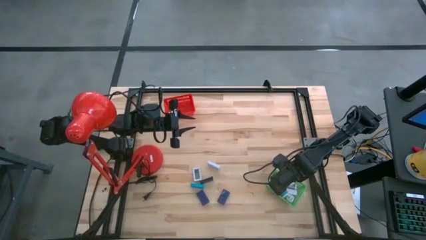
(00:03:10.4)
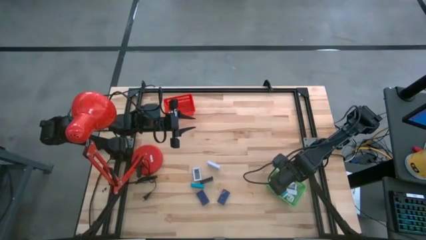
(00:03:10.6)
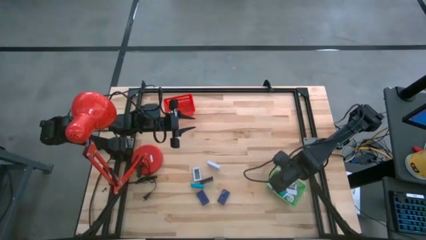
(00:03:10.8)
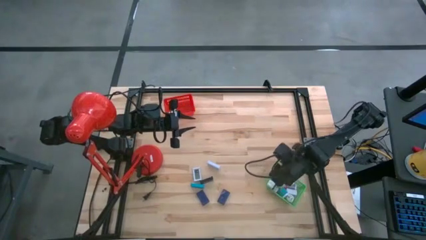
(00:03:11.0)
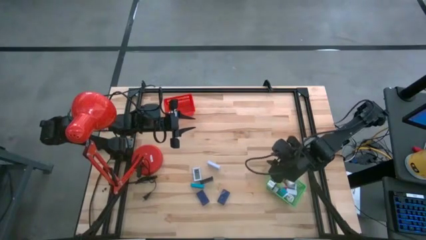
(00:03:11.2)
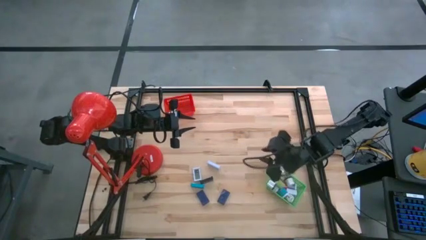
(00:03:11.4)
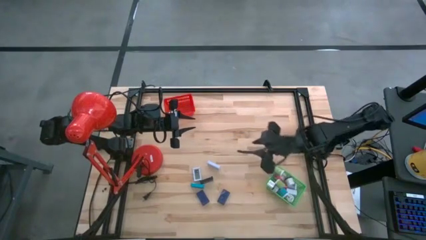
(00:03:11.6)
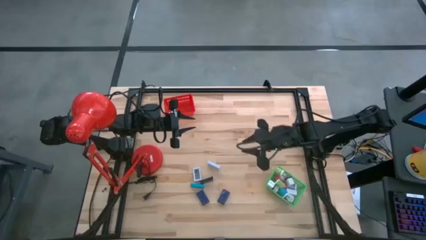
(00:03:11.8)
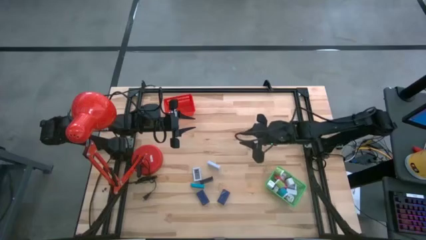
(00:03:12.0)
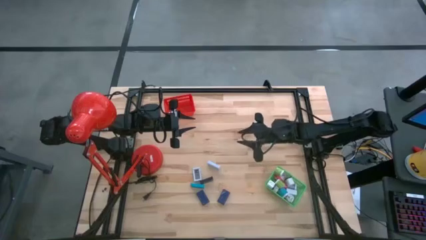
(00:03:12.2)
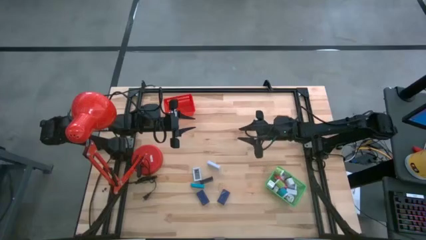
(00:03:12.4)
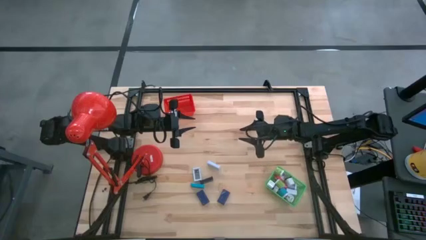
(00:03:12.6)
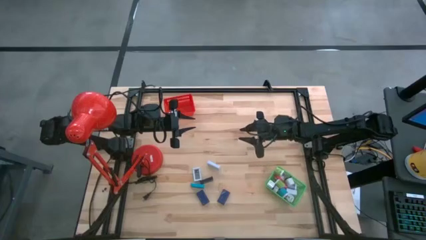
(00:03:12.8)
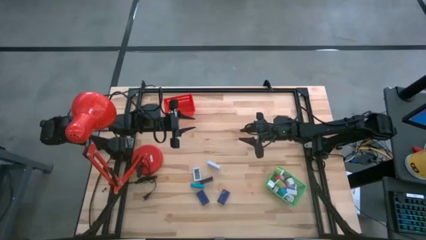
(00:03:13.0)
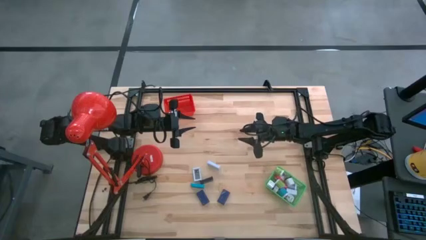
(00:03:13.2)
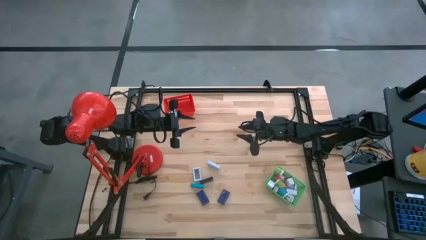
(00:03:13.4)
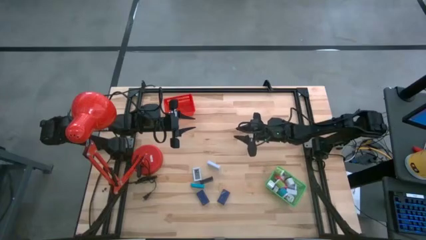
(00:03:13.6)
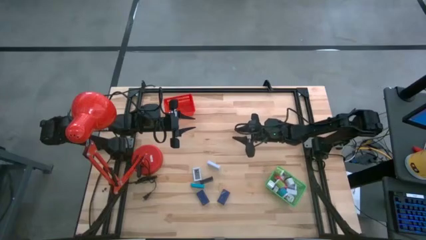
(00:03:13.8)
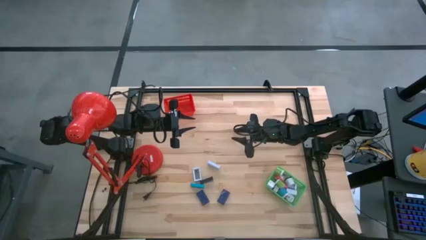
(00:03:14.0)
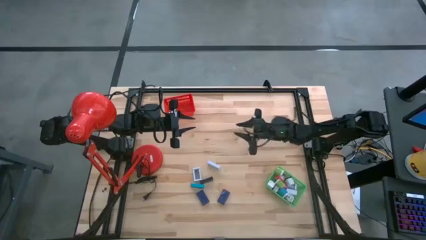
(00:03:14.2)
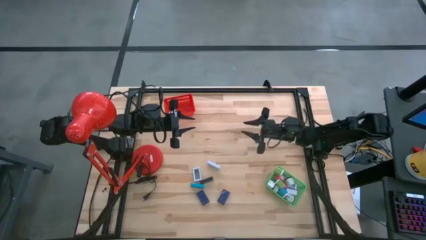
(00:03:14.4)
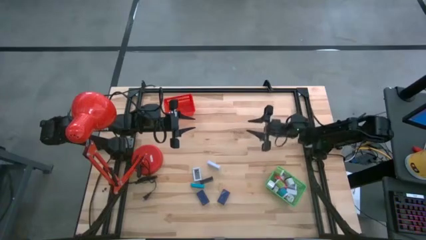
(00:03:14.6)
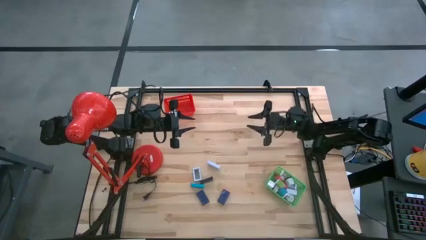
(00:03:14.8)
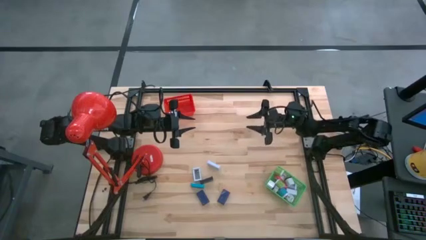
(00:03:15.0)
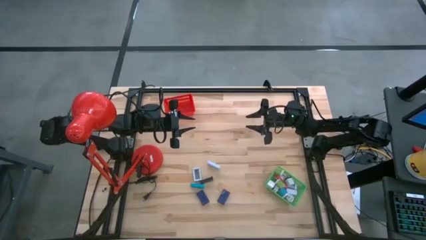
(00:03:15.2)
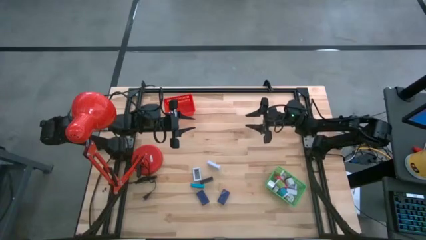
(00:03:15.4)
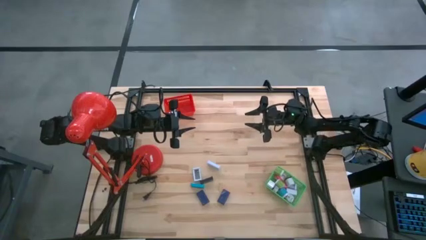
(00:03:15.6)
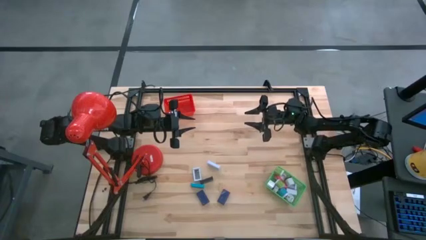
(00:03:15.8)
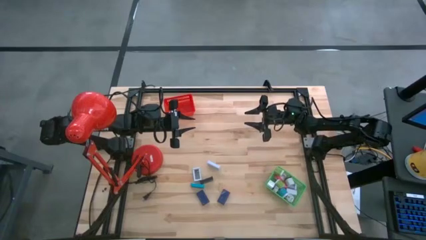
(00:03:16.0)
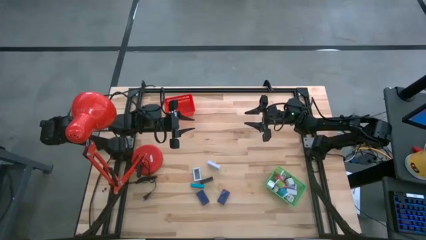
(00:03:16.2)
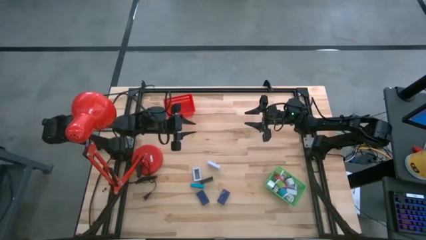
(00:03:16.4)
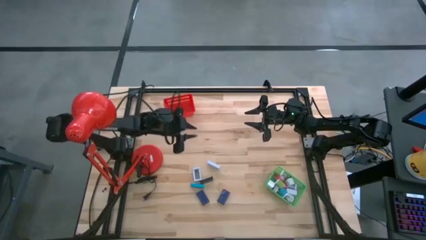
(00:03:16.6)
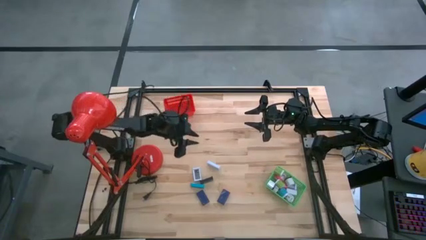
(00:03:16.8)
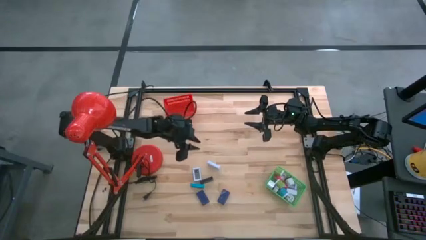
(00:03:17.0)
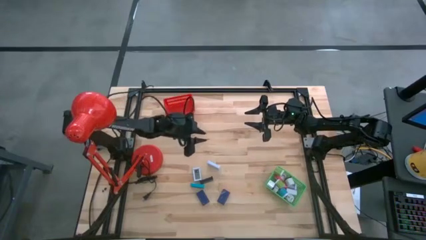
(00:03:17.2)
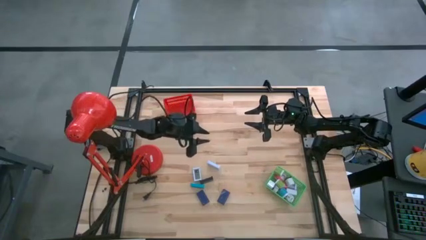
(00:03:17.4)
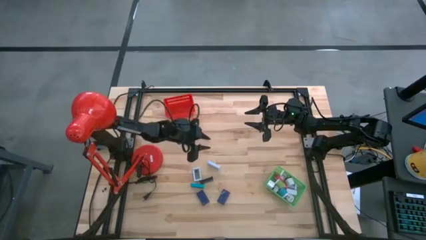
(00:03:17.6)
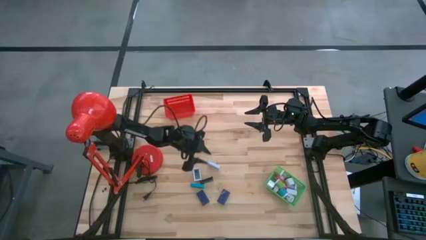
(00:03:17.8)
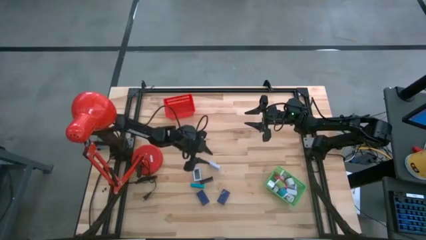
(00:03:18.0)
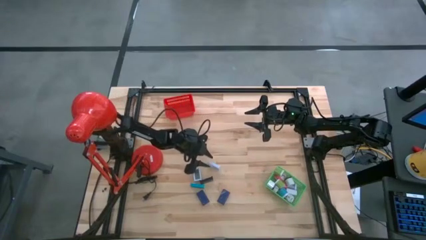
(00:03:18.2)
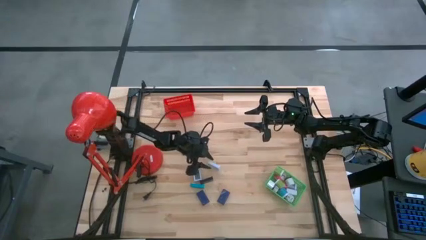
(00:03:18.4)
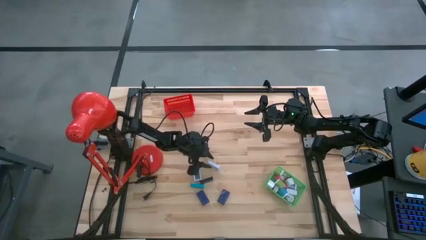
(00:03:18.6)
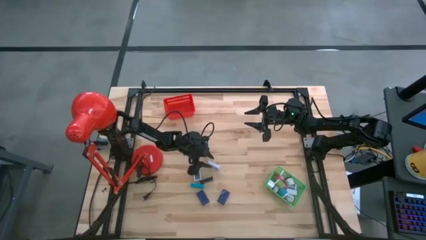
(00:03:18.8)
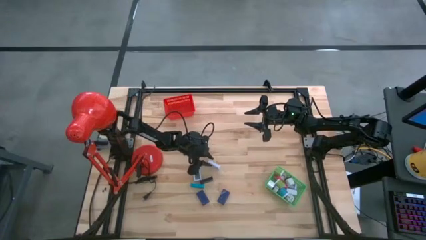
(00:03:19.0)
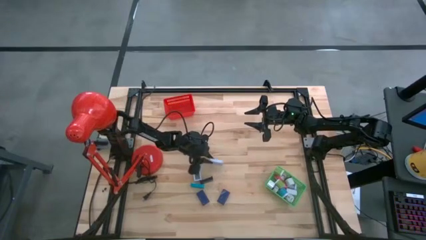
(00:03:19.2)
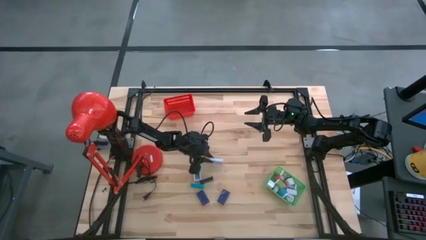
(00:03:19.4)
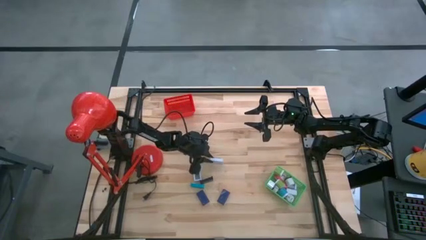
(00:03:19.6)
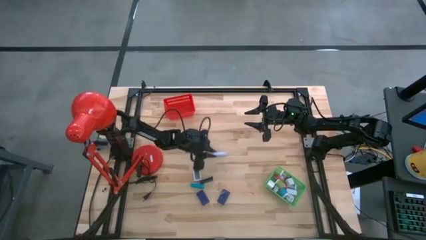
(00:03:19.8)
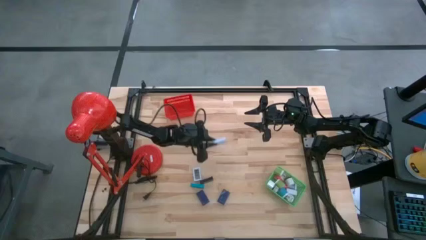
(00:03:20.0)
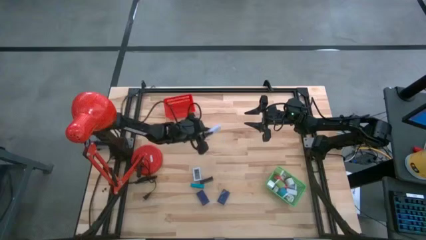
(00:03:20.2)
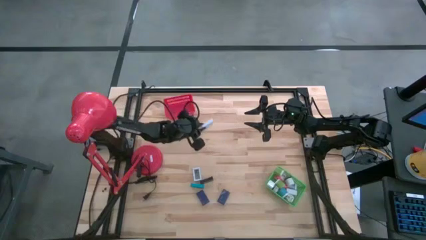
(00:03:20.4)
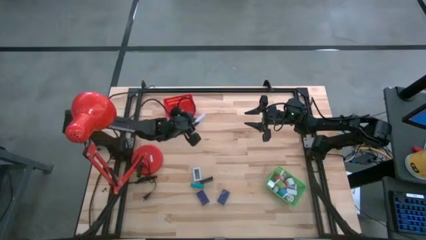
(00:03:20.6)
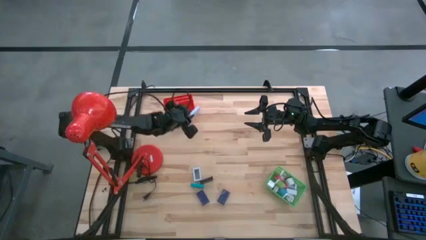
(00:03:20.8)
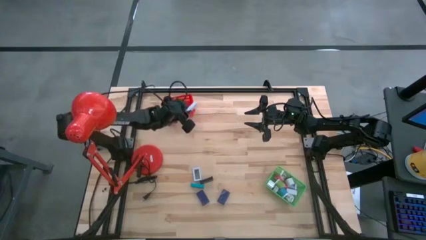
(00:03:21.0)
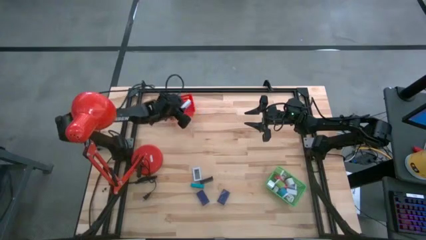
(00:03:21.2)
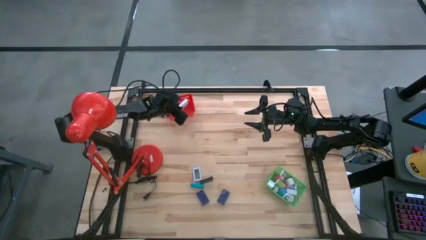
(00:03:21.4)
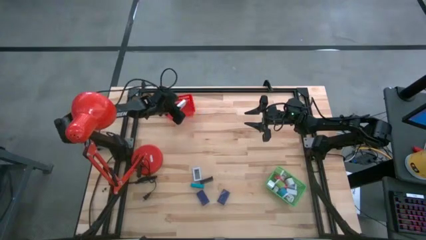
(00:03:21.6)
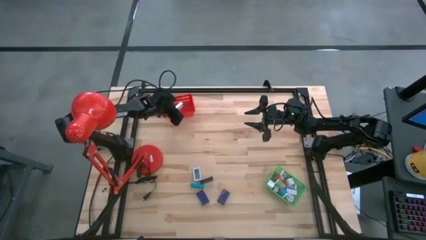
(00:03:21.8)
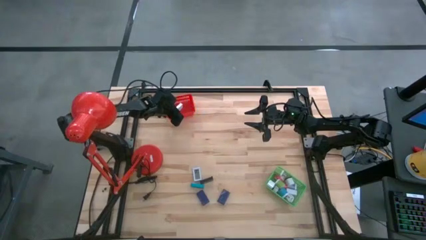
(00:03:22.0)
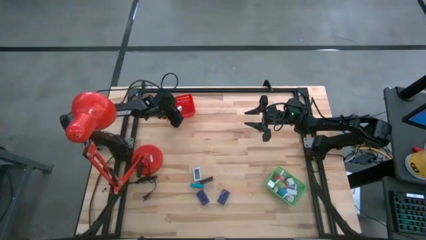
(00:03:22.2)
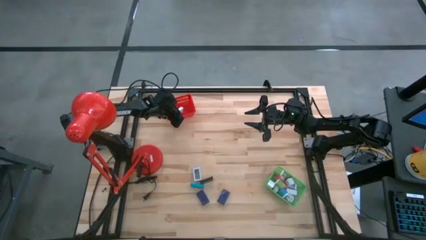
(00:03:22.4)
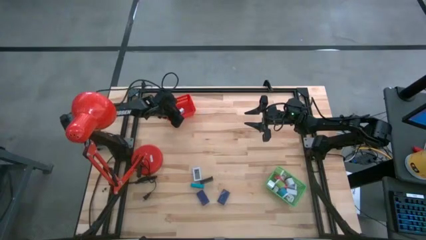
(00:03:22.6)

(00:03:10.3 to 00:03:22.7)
Task: Pick & Place Office items
Put the right white digital clock into the red bin

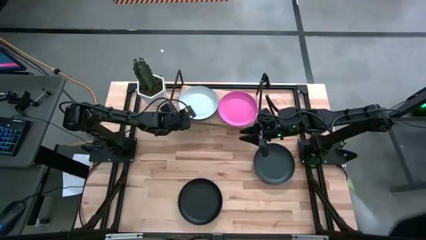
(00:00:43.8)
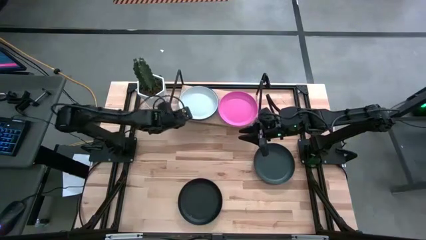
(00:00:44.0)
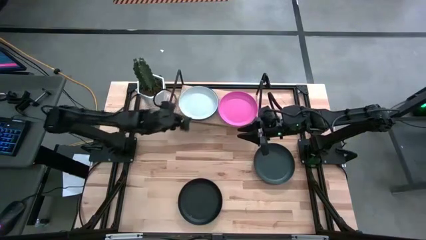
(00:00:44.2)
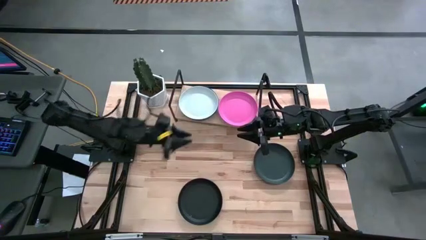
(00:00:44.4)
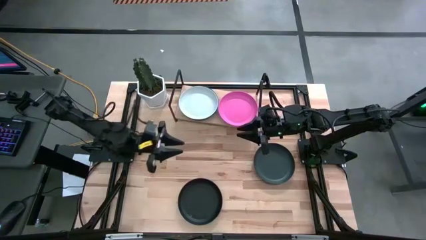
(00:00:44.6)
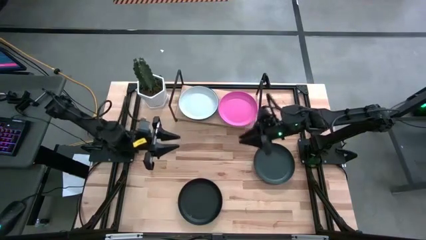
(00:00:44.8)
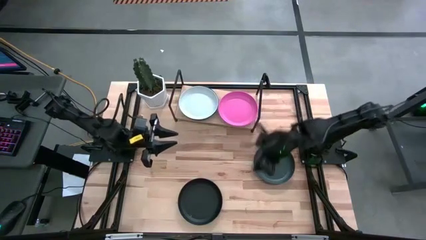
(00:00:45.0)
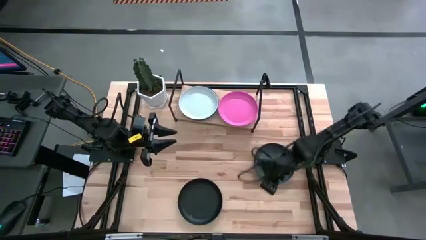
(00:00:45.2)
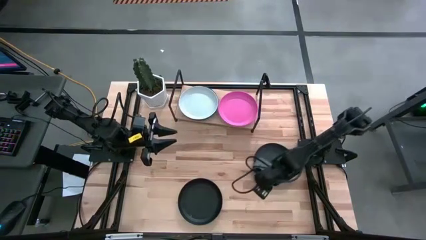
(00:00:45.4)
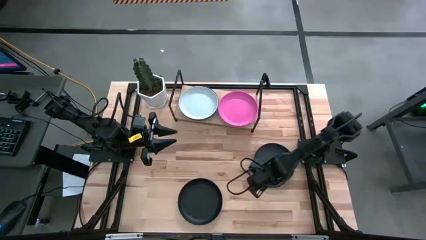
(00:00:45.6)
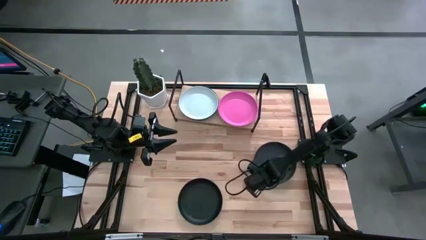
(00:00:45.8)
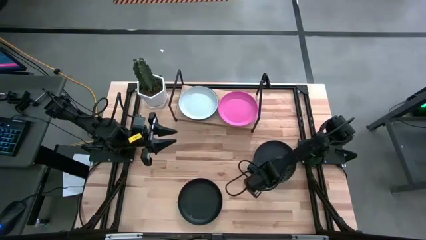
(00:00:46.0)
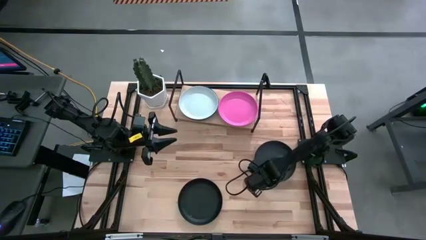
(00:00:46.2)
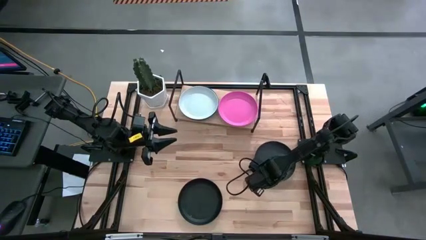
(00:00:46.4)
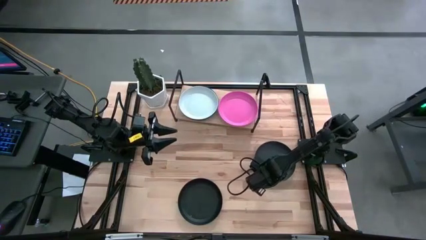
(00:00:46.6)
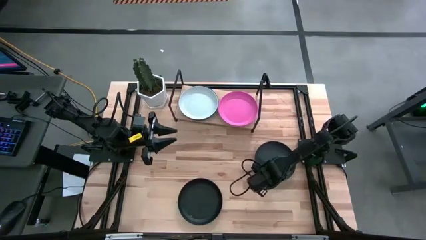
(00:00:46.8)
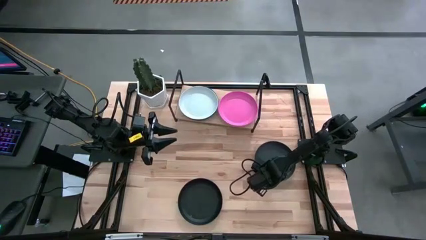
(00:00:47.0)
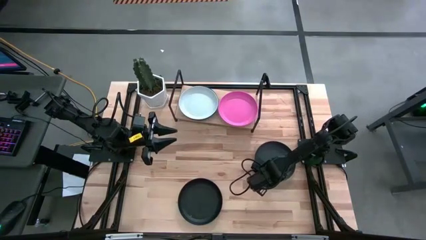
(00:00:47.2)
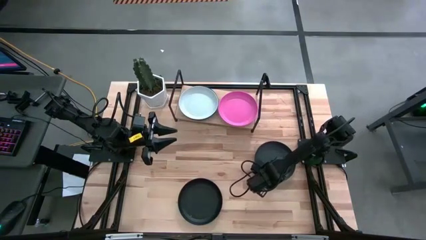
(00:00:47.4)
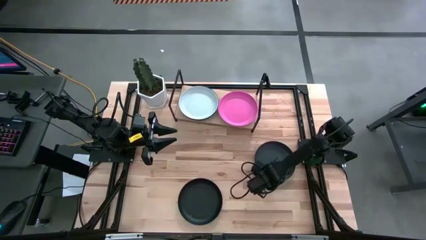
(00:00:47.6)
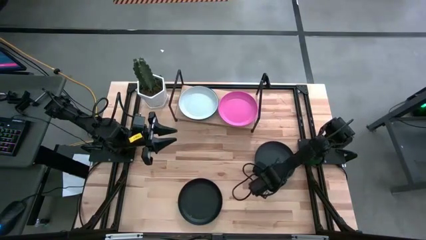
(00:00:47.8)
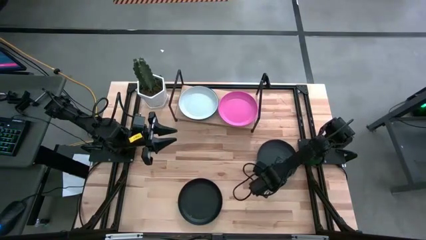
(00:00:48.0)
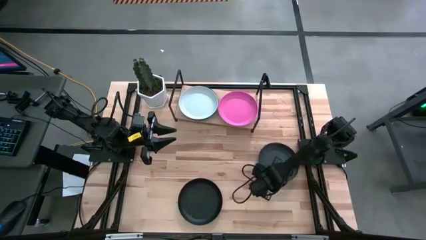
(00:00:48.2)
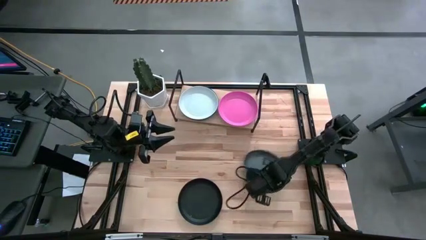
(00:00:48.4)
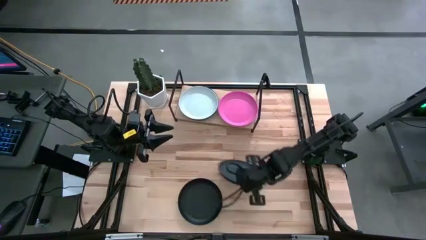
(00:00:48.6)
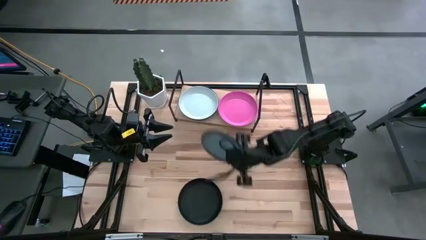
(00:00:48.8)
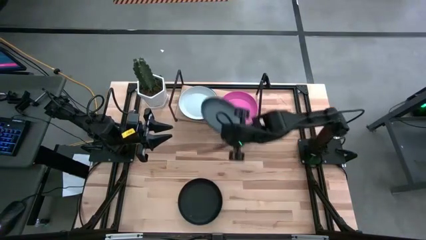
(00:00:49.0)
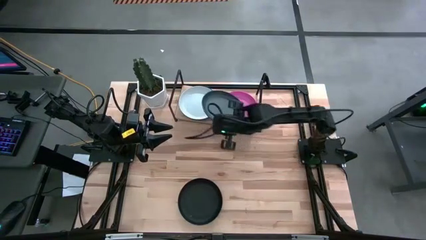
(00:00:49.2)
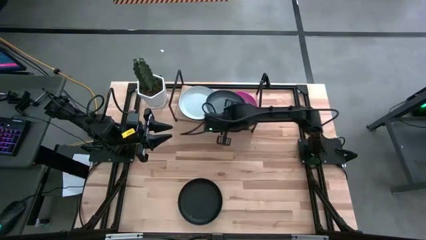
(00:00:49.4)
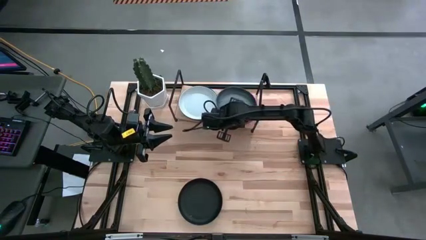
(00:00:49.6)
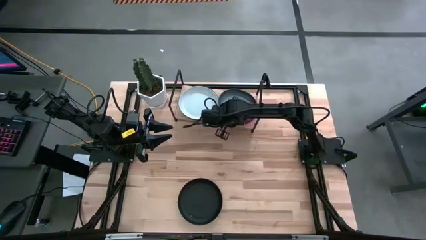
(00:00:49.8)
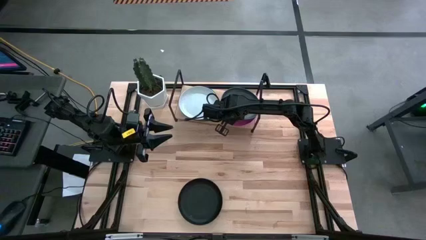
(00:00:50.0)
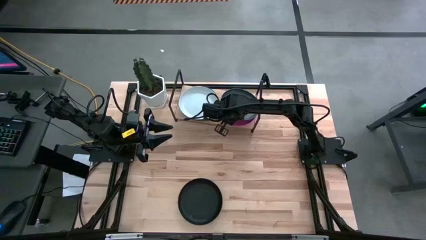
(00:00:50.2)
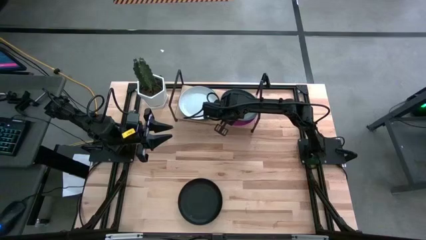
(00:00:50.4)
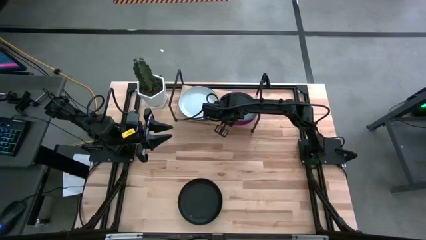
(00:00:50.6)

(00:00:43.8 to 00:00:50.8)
Task: Place and stack plates onto a shelf
Stack the dark green plate on top of the pink plate on the shelf
